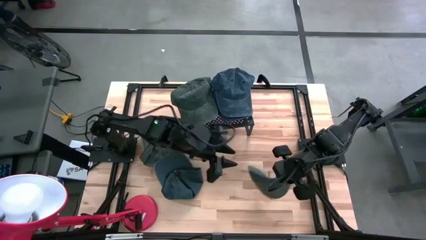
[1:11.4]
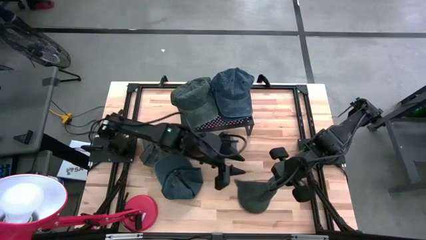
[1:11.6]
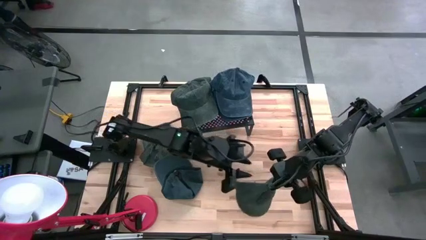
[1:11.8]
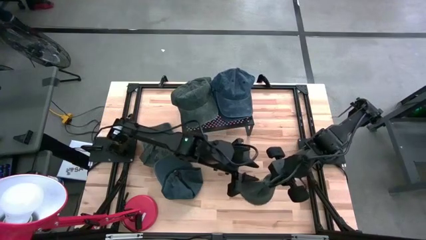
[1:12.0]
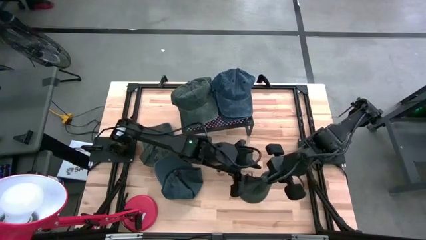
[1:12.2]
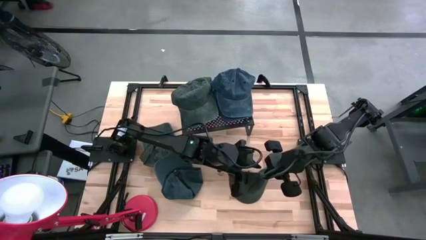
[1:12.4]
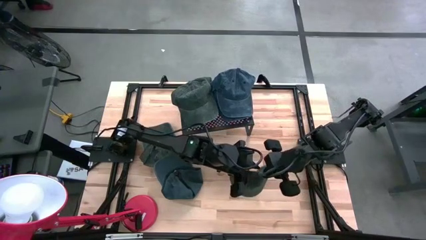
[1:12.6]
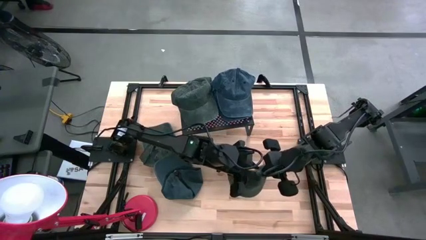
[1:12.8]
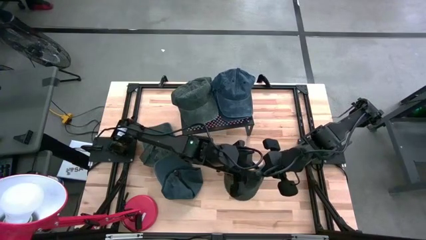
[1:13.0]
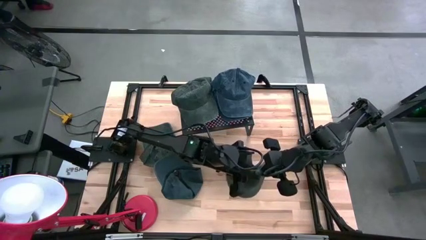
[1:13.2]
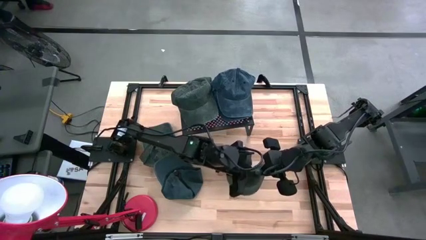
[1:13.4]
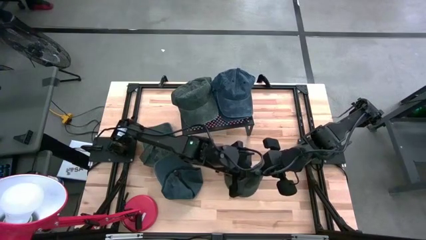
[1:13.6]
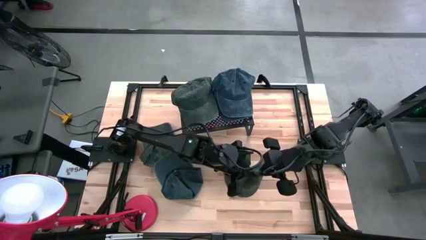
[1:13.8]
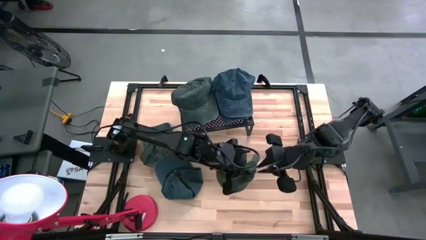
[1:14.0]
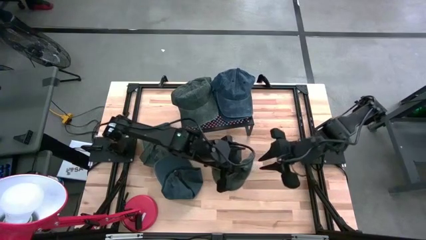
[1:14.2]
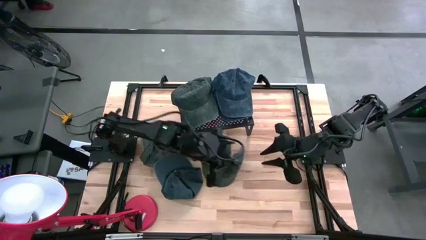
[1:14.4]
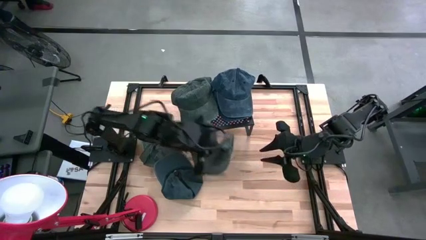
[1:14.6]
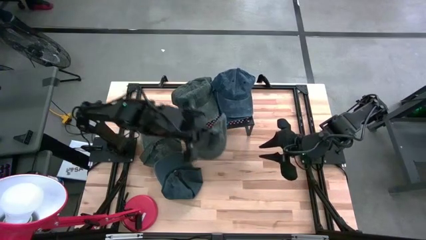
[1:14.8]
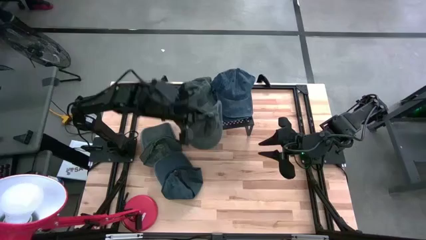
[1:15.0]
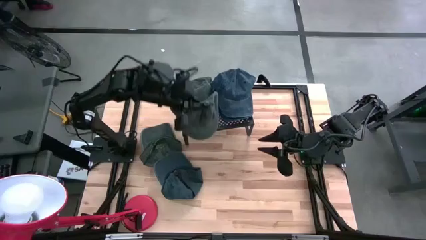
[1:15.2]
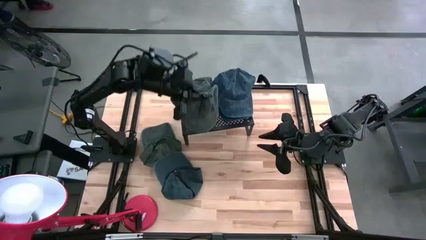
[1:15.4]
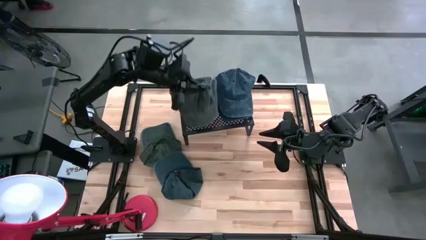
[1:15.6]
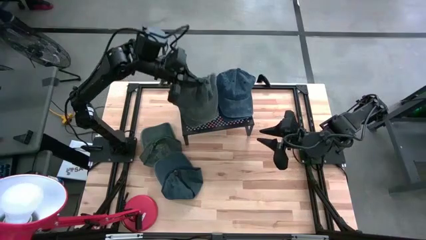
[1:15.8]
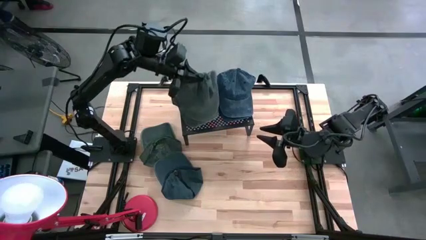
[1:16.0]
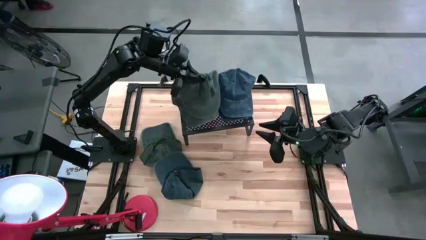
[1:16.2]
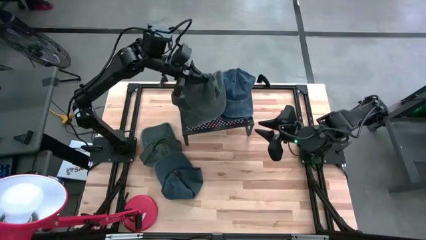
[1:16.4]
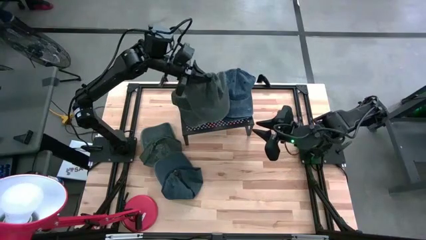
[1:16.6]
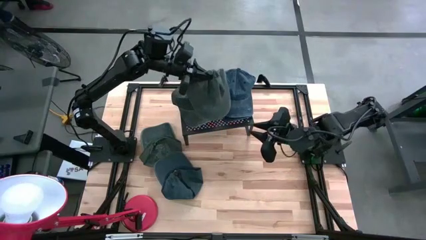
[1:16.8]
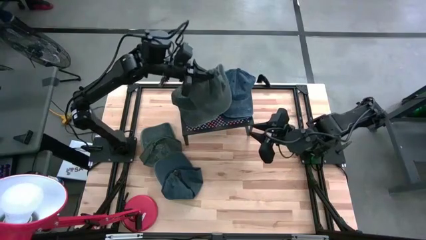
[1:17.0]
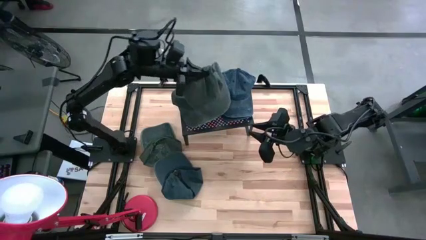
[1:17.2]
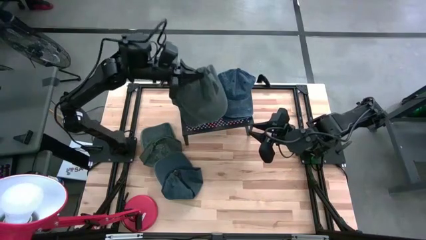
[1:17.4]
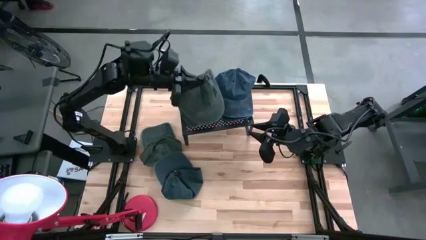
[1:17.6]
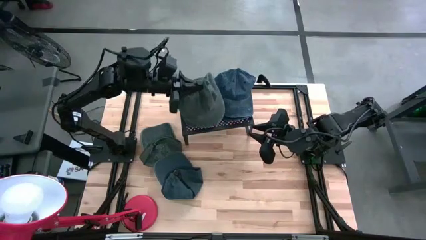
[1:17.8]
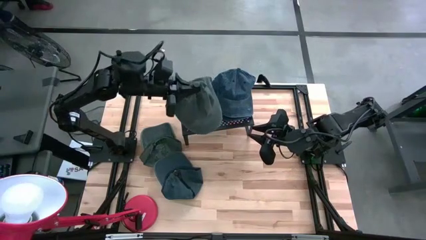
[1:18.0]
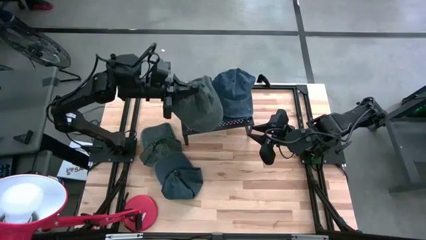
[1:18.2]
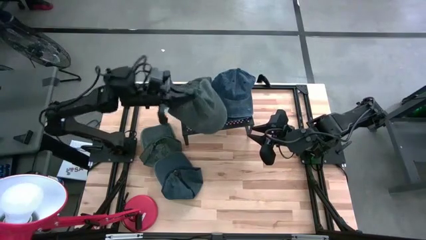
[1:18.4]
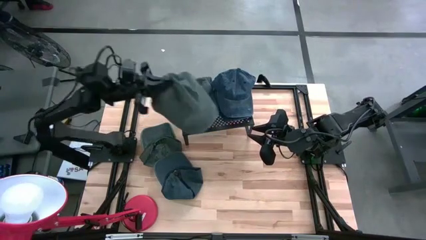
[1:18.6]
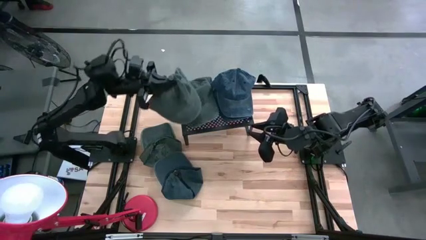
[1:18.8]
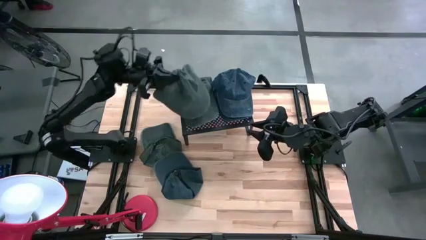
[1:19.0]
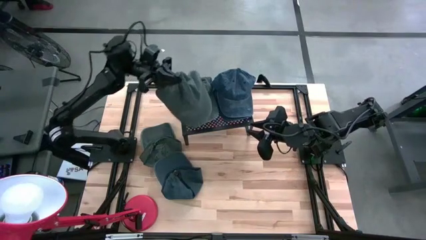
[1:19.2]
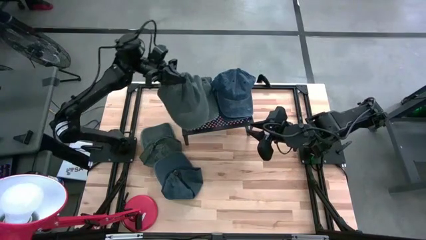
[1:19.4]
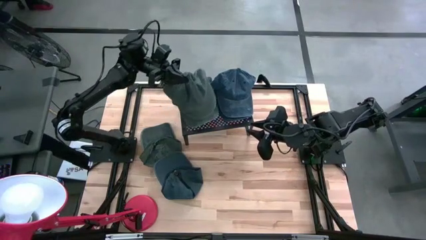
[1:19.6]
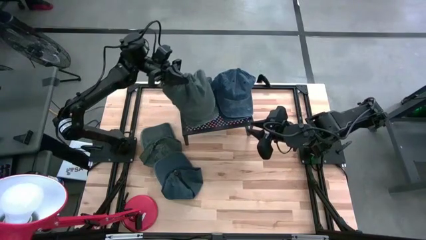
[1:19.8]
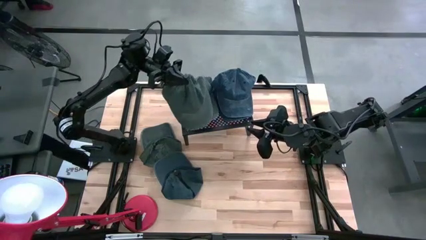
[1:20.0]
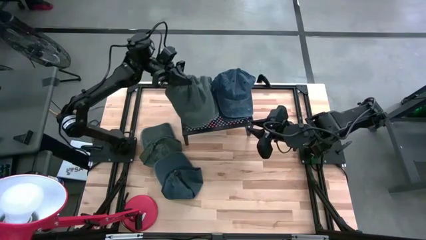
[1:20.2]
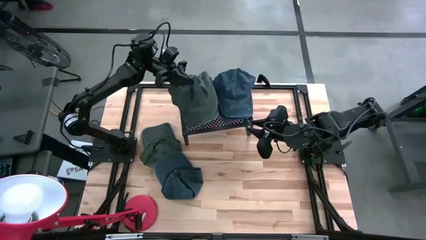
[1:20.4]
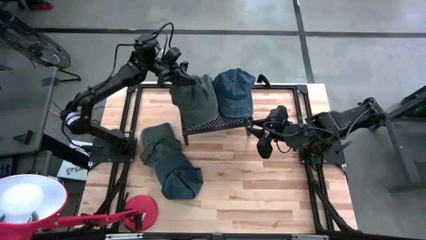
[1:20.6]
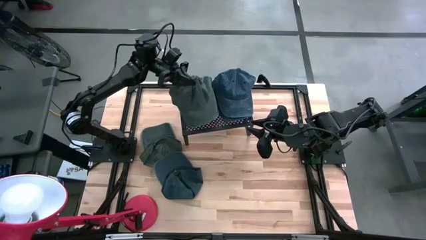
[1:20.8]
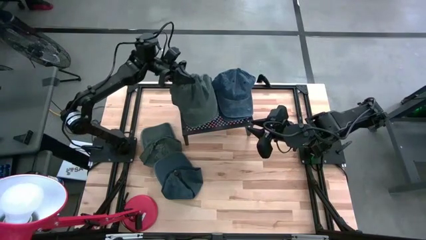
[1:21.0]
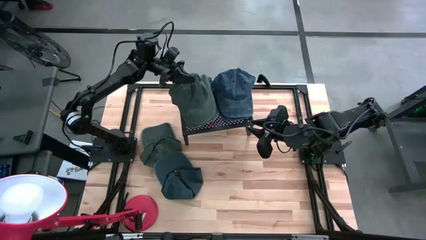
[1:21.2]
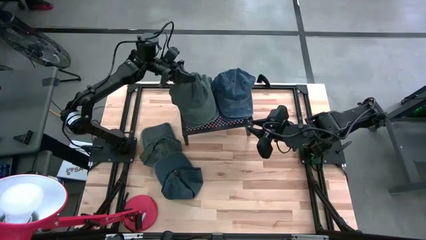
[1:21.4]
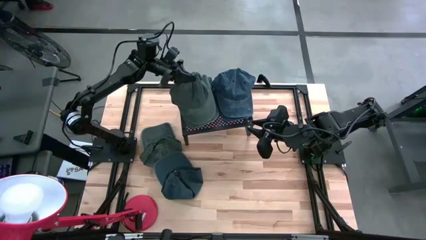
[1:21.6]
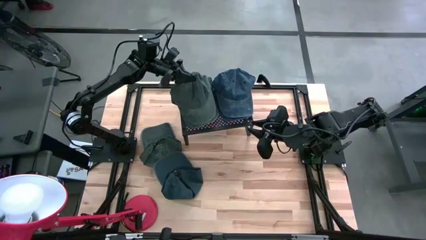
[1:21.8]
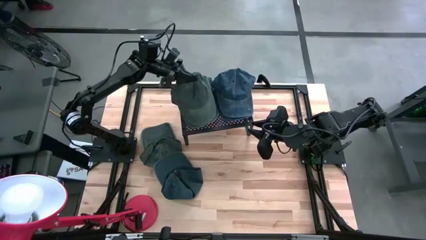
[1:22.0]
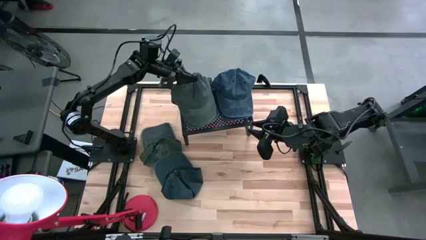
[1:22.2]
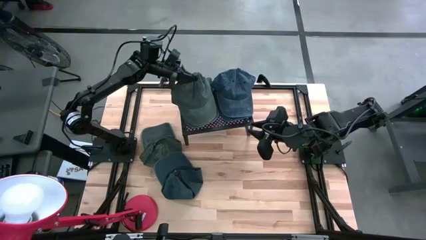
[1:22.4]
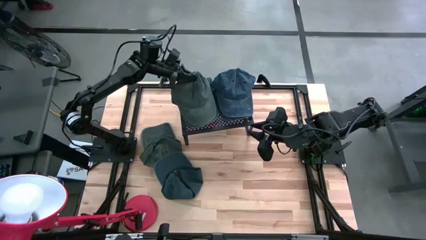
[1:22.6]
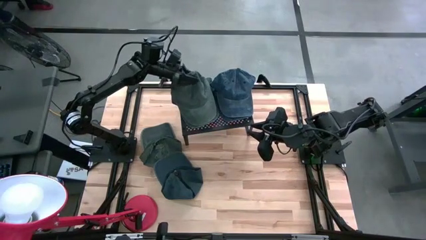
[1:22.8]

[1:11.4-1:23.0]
Task: Pick & Place hat
Stack the dark green cap on top of the dark green cap on the shelf

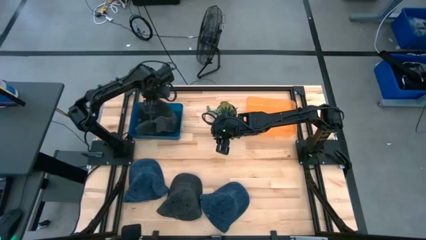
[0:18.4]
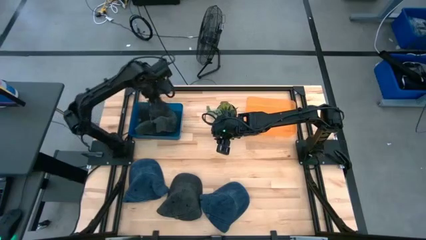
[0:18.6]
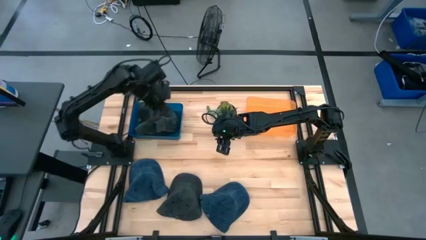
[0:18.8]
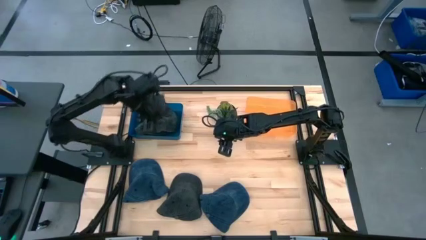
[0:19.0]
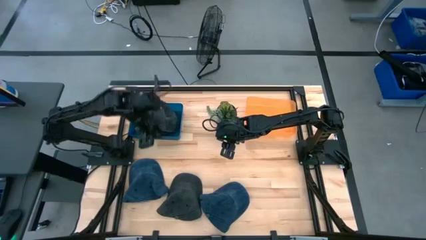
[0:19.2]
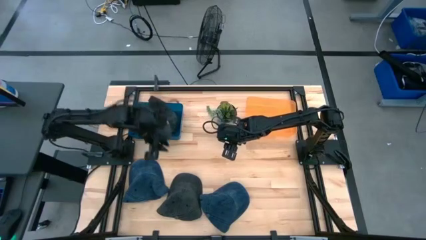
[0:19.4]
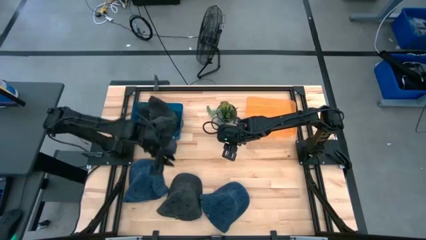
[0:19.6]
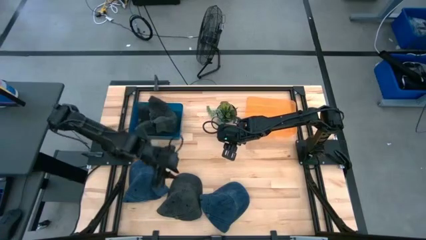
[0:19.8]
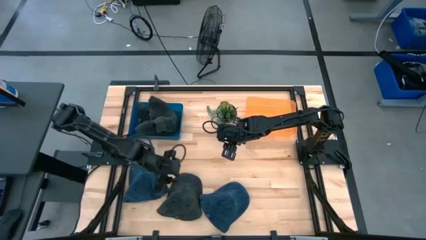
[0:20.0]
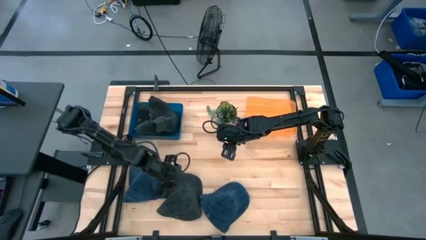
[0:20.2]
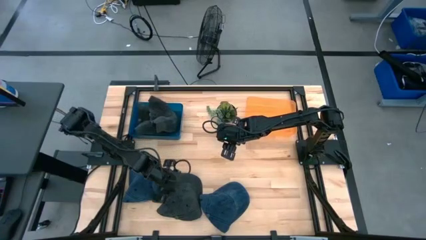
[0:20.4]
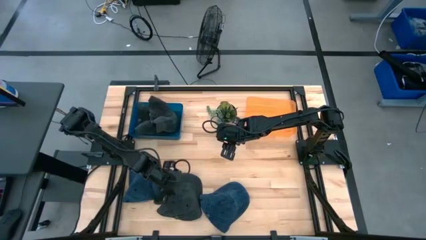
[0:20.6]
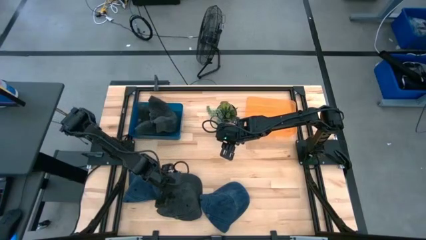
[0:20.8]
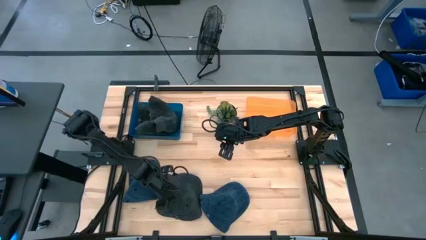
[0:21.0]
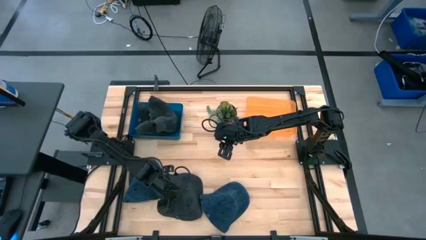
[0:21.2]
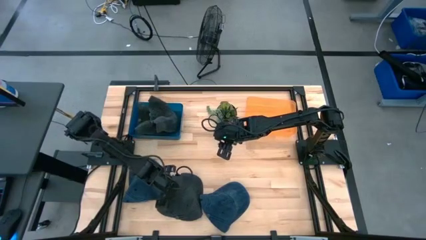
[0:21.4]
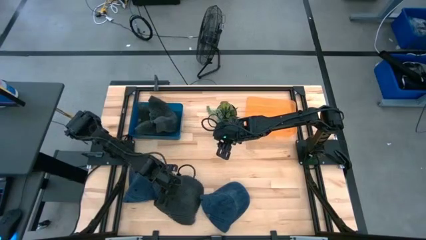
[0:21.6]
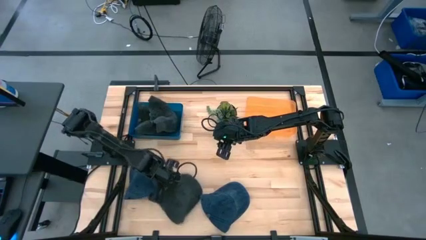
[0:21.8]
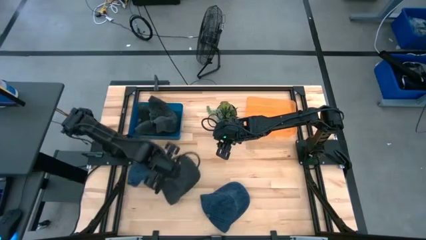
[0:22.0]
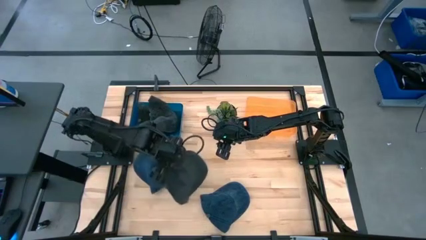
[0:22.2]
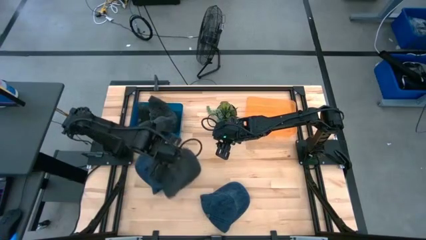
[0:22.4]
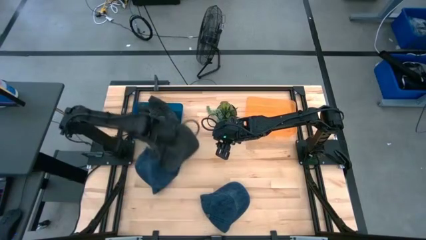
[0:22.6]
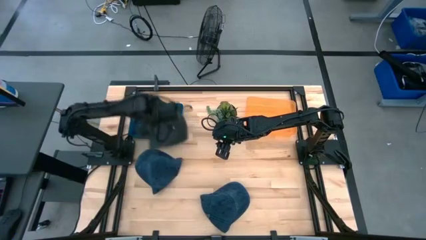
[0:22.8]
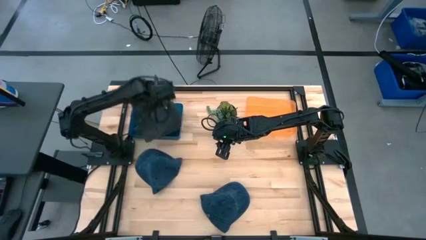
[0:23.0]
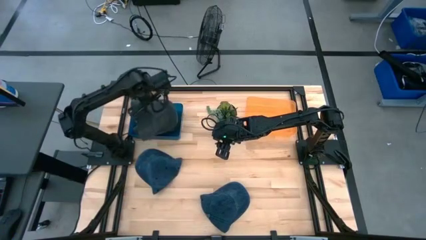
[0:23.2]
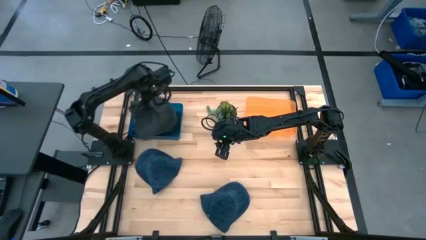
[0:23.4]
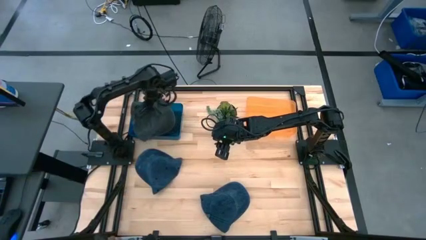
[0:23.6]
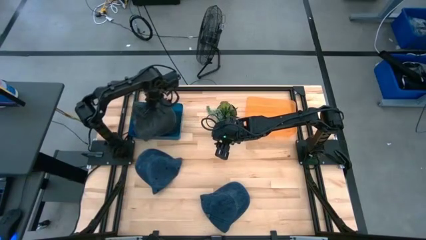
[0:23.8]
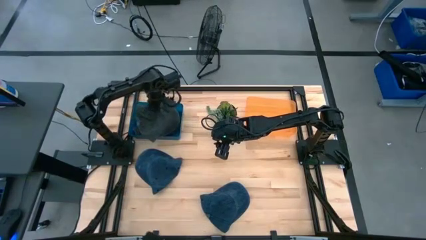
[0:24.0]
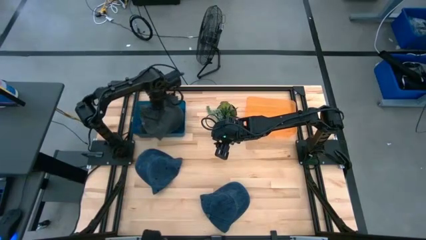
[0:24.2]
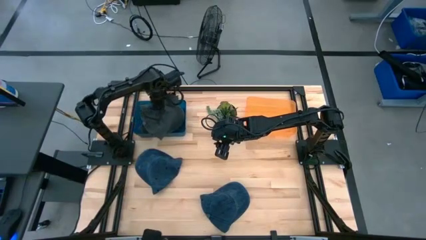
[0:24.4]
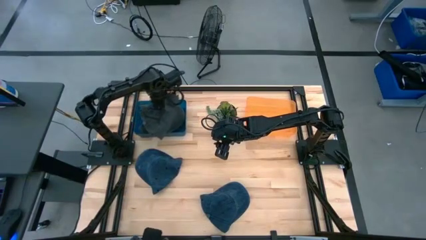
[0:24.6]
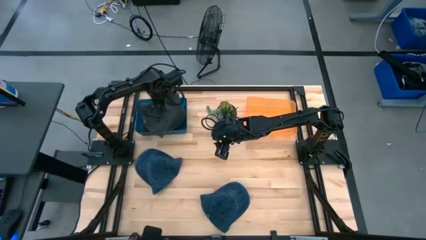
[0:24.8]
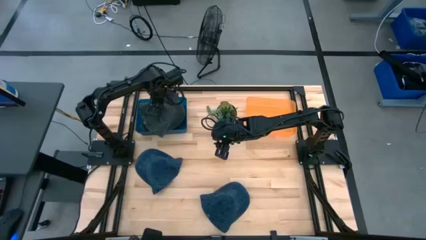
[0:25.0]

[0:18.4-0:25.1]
Task: Pick & Place hat
Put the black cap into the blue bin
